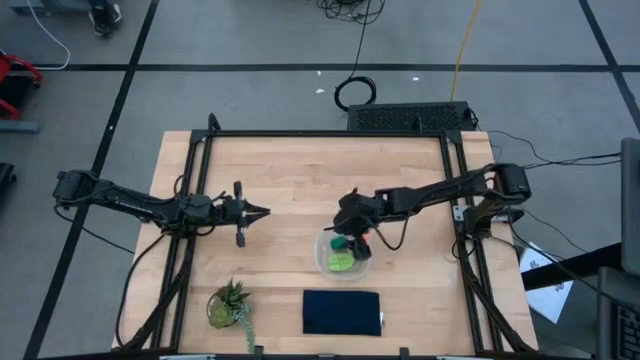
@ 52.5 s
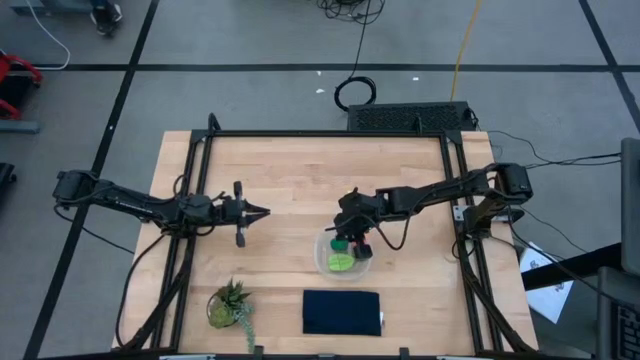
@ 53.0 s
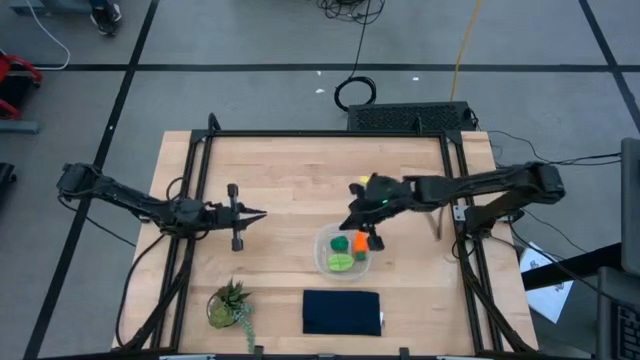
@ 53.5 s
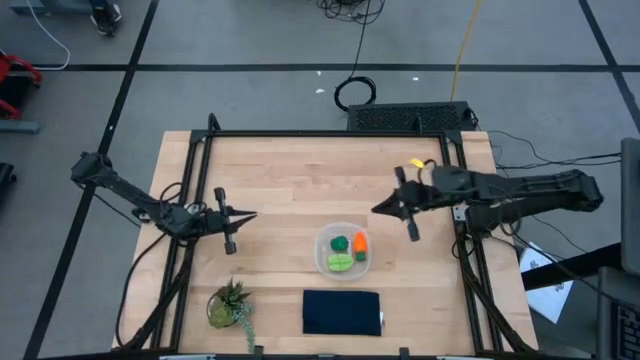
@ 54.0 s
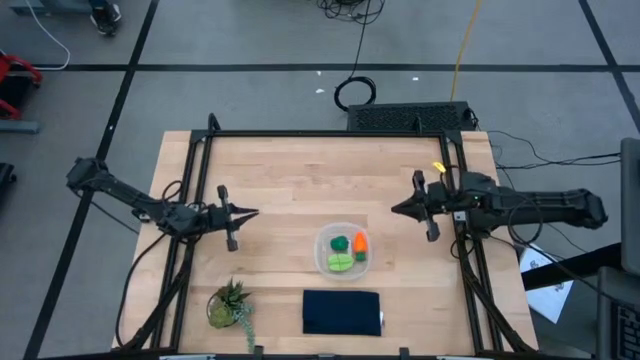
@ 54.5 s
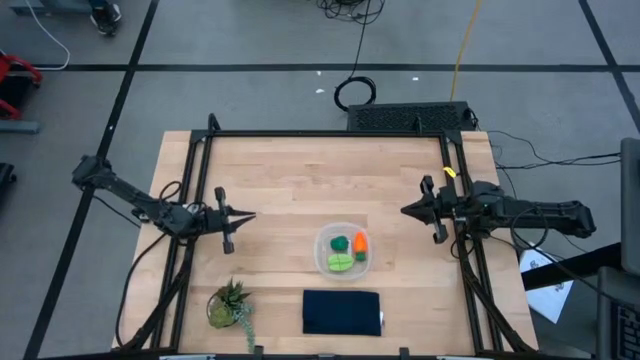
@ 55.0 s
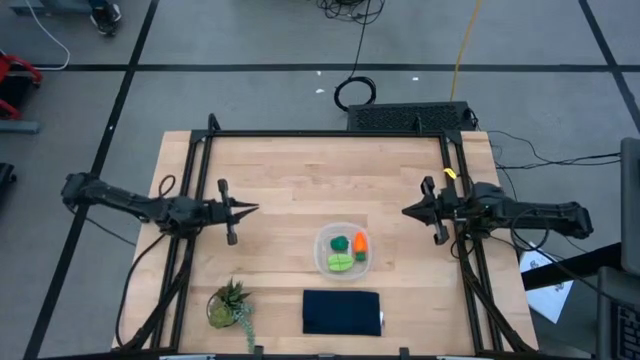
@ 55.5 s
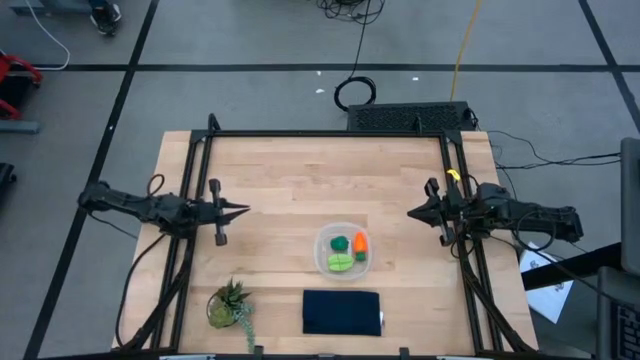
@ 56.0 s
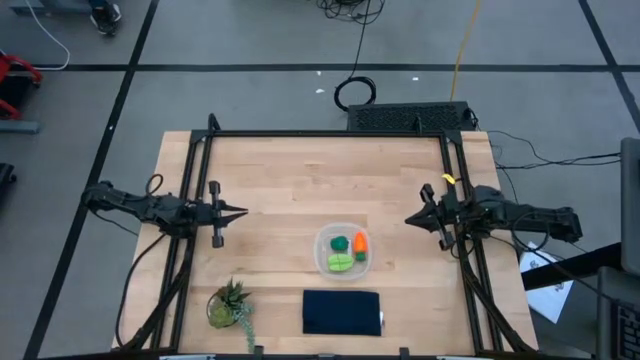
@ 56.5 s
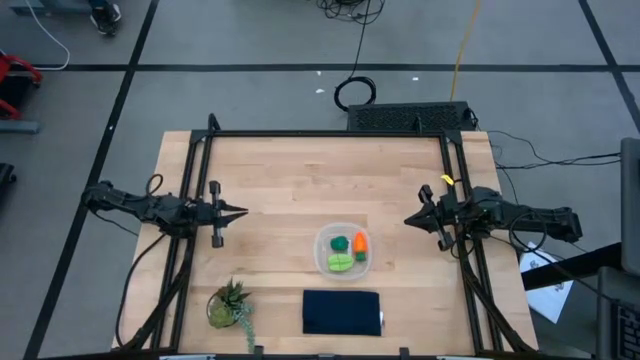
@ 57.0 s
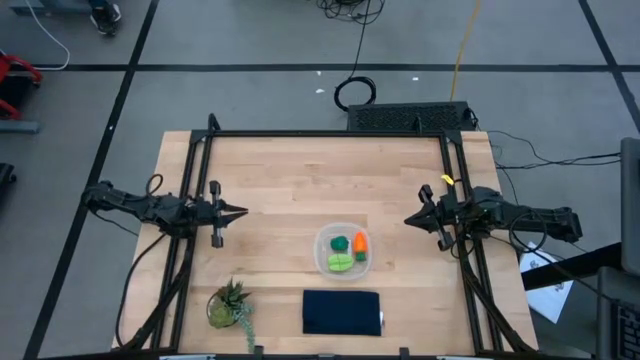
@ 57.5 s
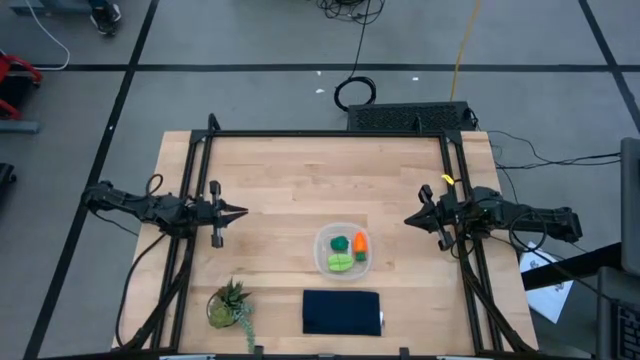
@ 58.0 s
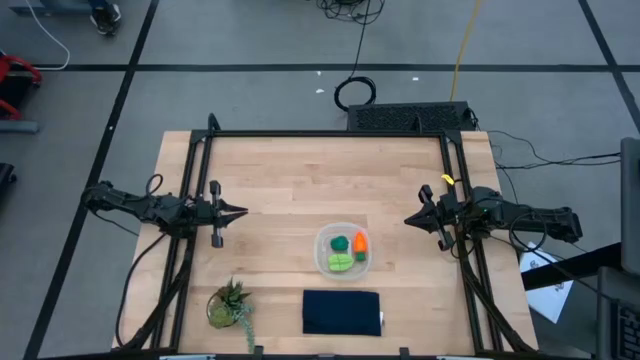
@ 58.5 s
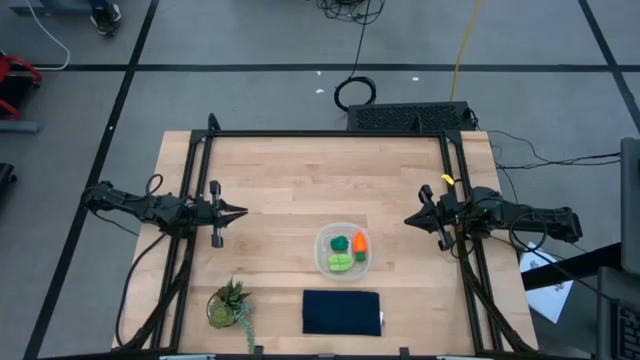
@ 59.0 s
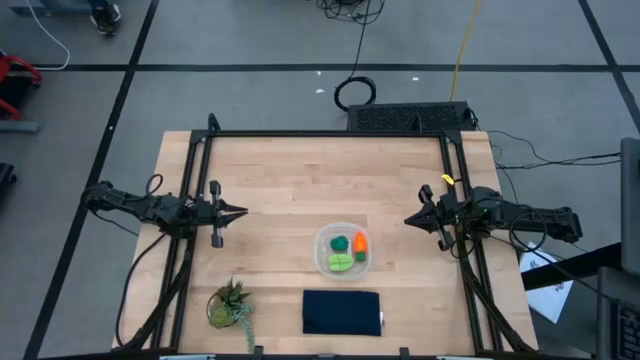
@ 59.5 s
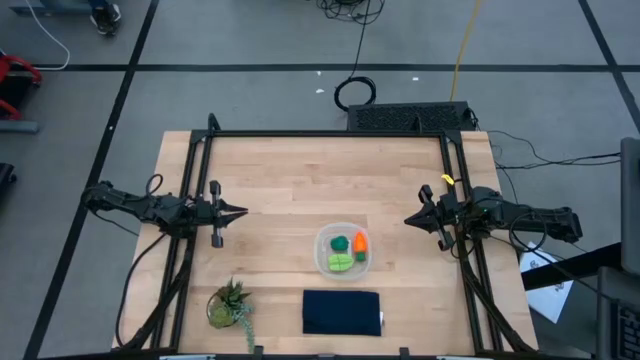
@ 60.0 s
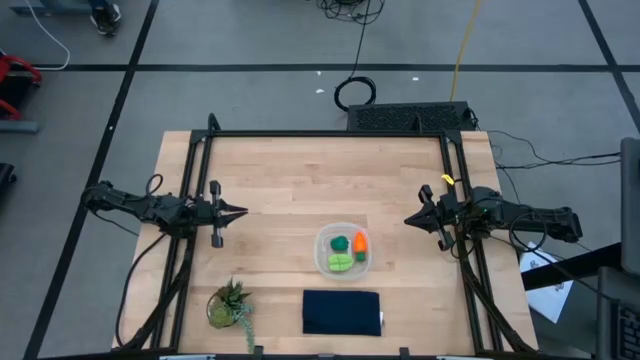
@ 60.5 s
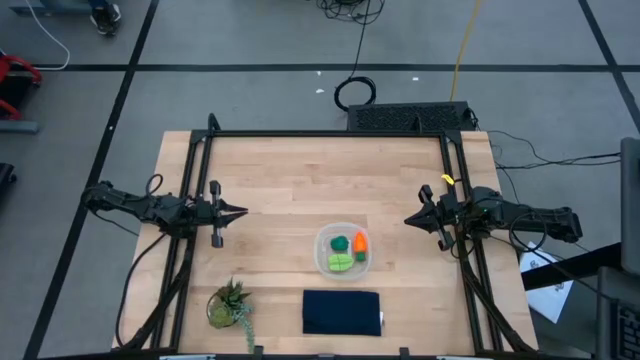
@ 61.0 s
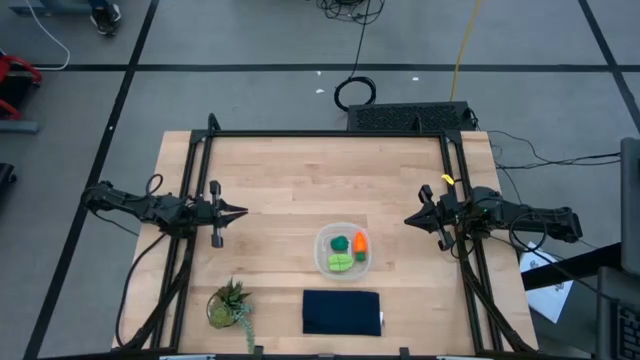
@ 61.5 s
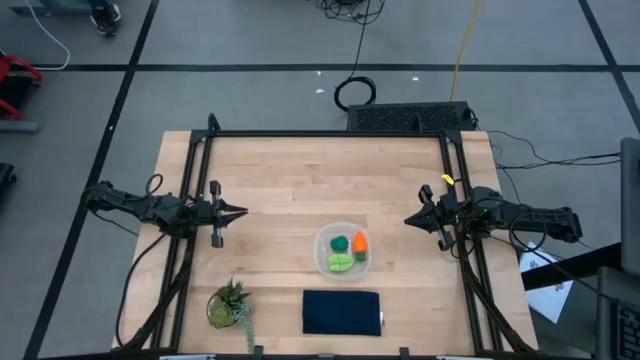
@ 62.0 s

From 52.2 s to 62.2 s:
Task: Pick and placing Produce into tupperware
Return to Home Position

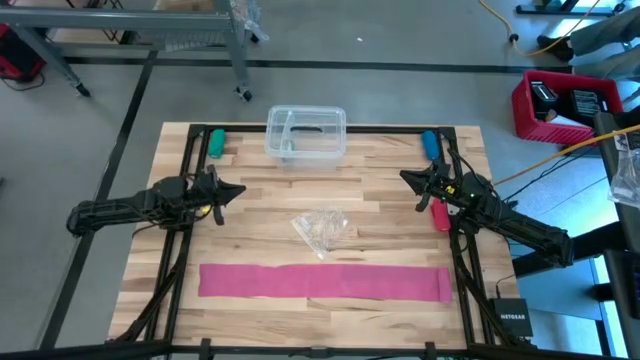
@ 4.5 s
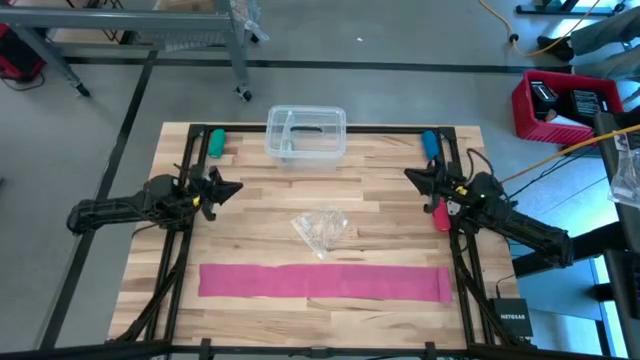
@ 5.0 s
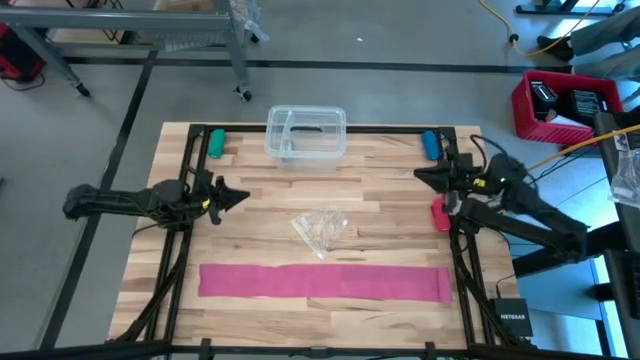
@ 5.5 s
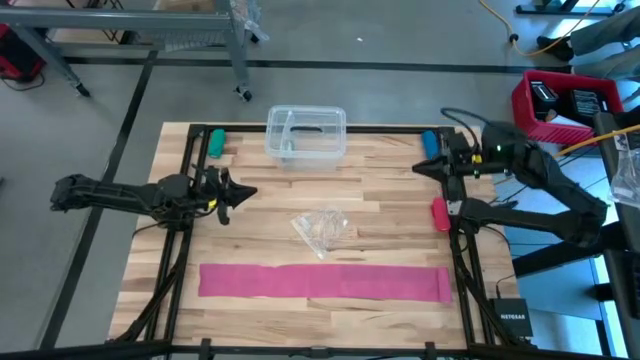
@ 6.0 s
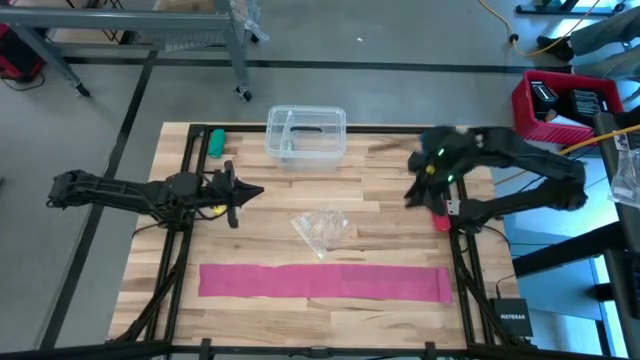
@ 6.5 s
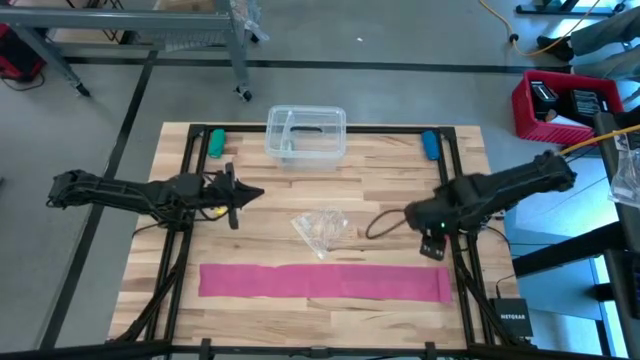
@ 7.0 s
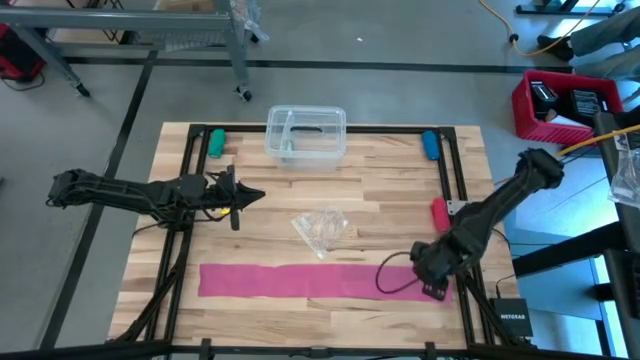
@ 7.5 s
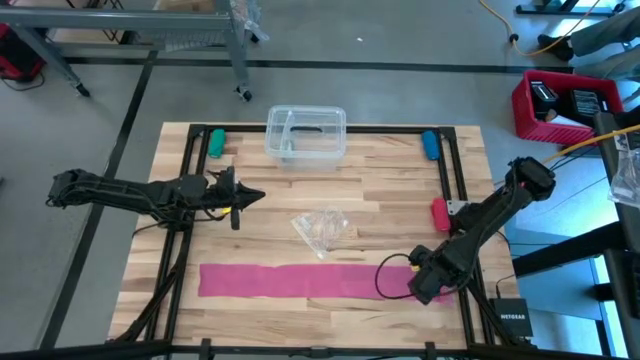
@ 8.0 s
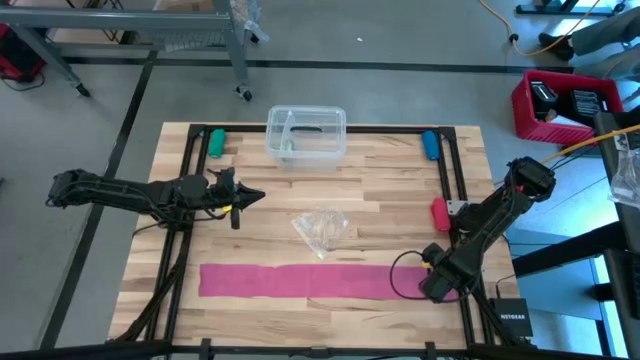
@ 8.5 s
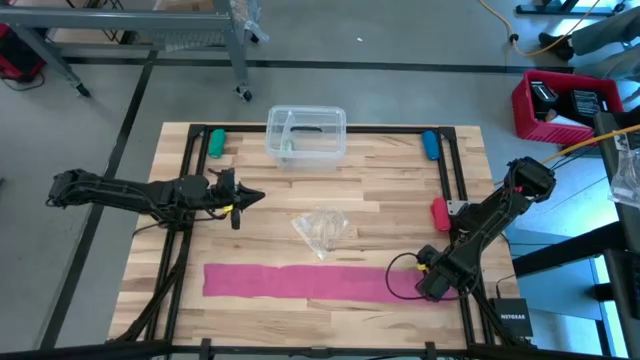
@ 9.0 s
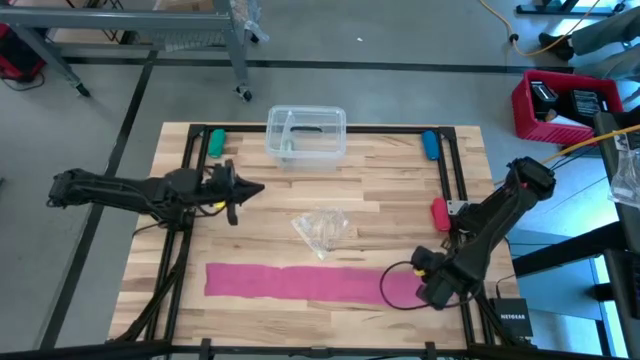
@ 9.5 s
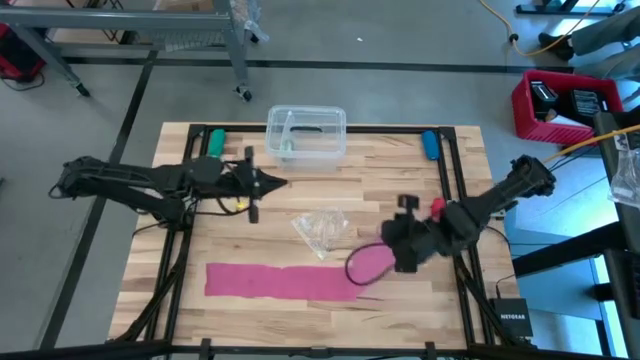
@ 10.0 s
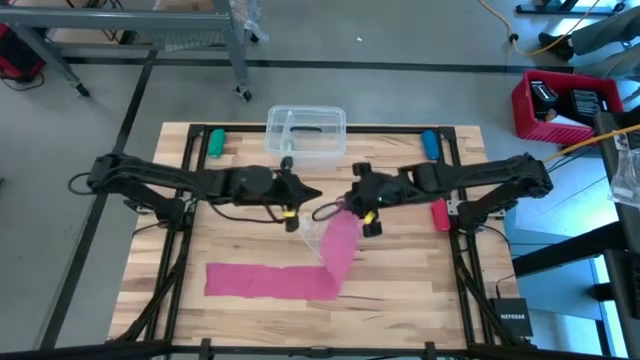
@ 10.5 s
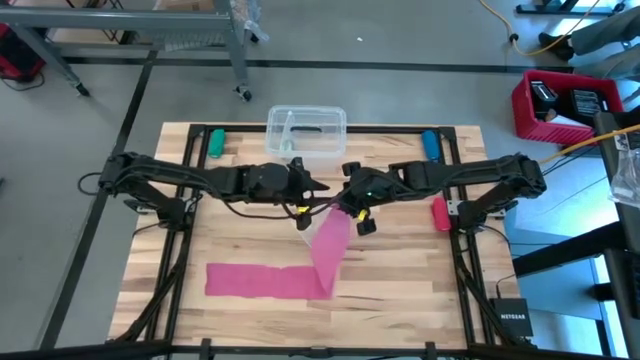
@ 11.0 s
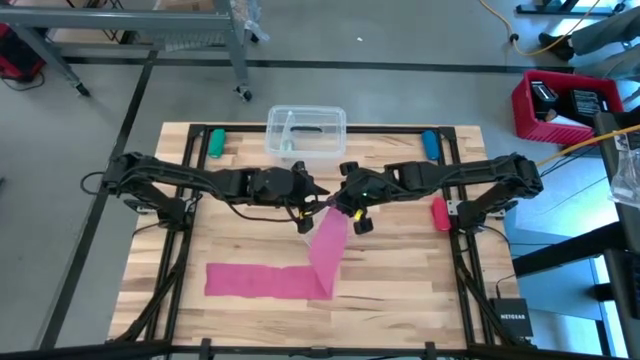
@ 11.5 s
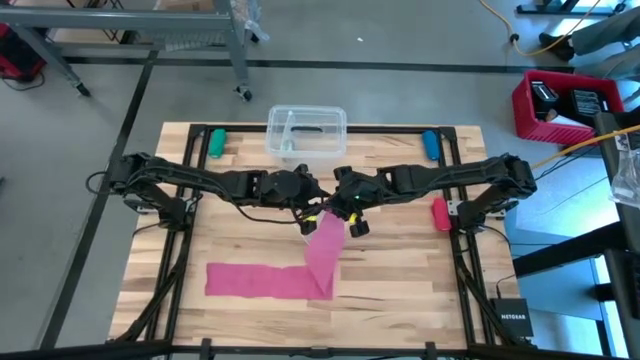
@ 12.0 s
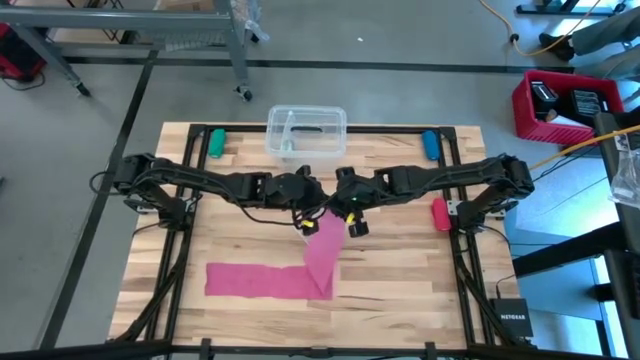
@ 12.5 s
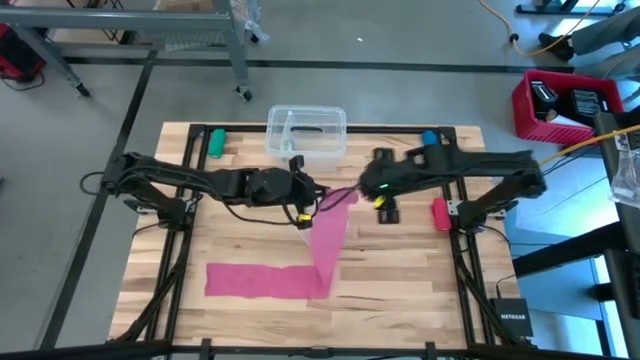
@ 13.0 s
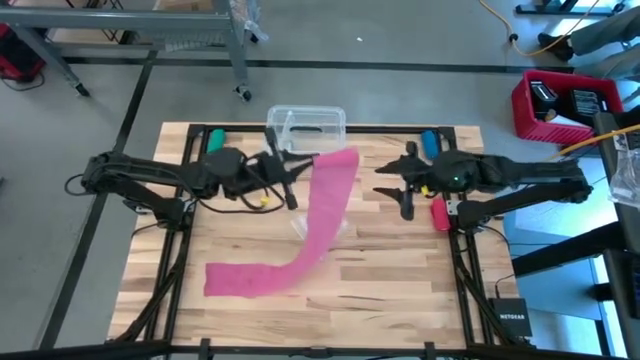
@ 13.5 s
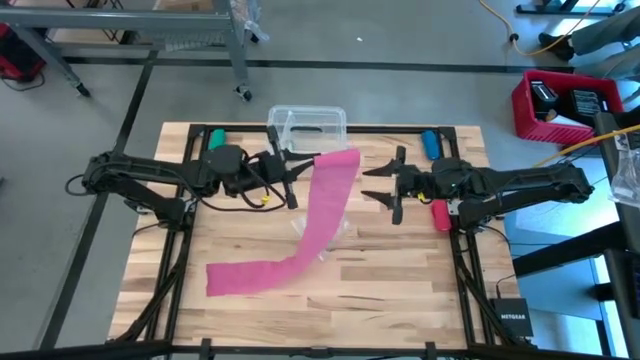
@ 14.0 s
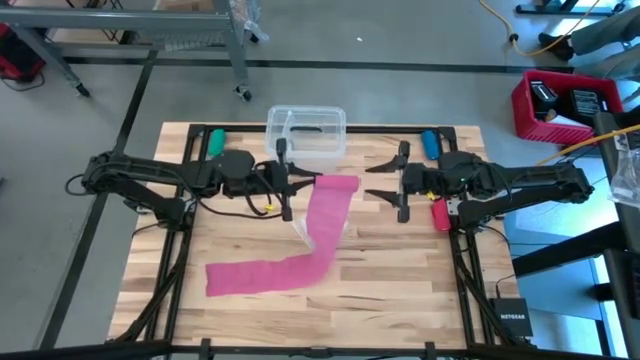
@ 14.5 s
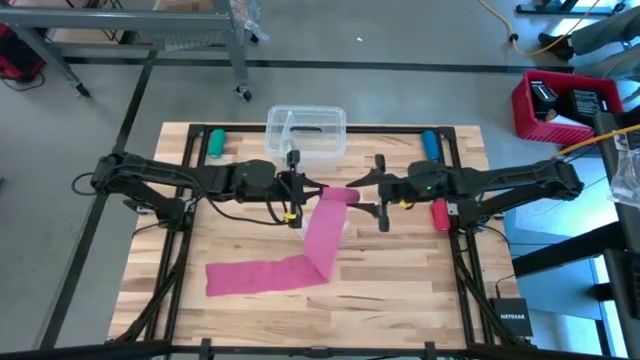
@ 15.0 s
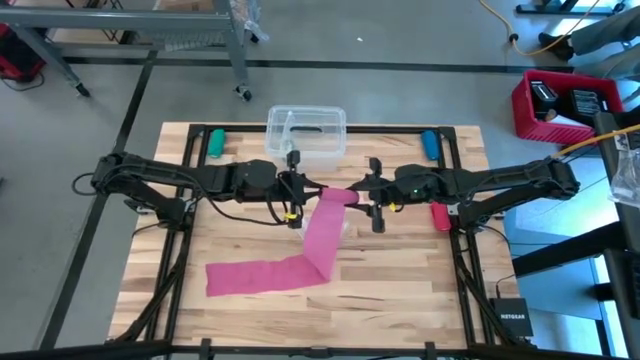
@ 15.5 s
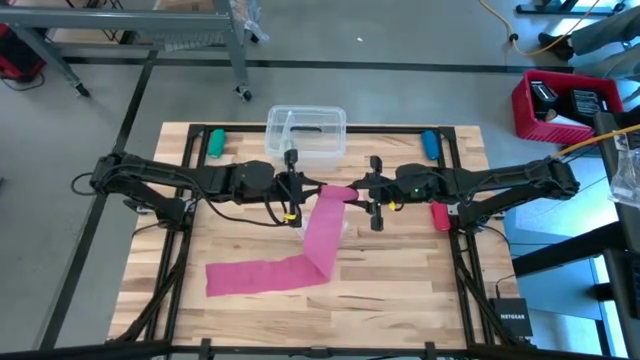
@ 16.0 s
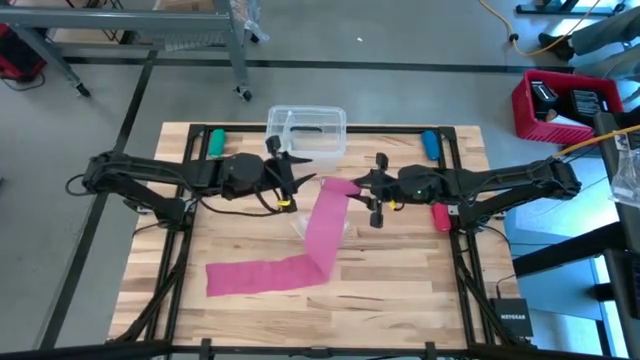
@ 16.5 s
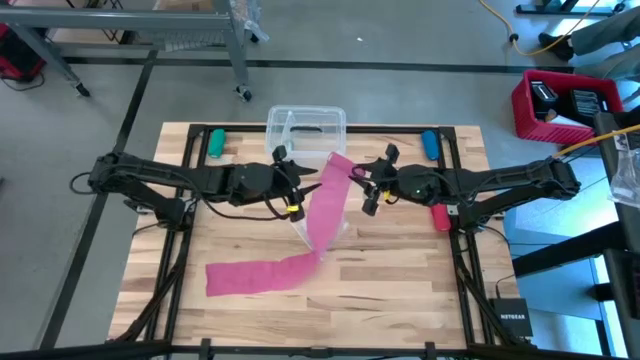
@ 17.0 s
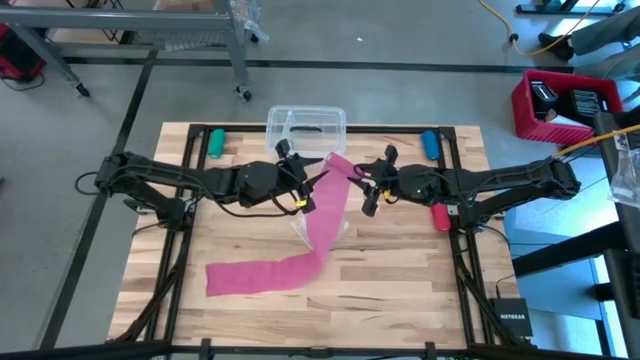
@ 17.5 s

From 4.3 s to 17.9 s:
Task: Roll bandage
Roll the pink bandage
